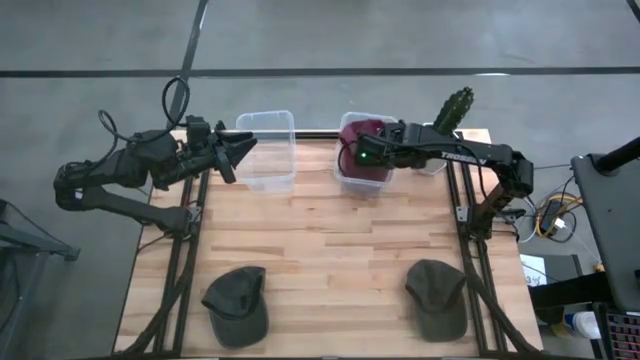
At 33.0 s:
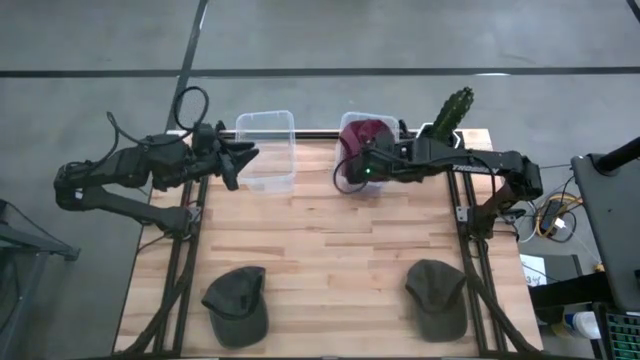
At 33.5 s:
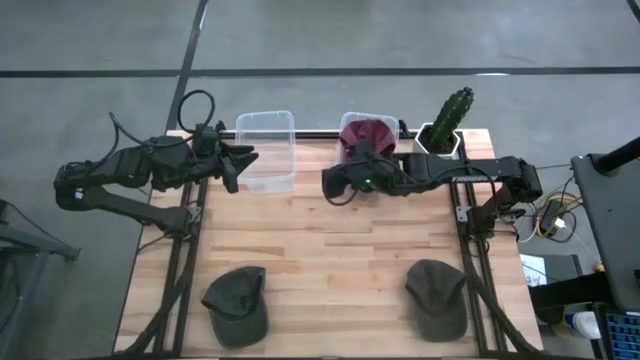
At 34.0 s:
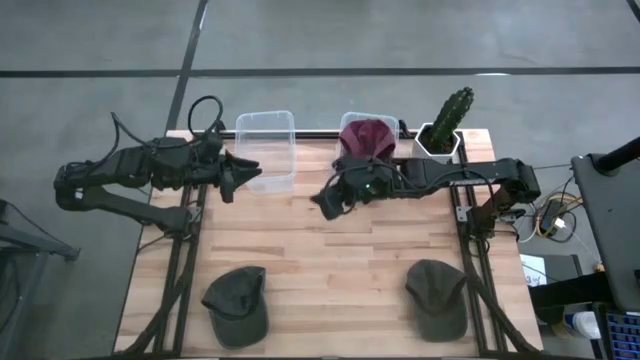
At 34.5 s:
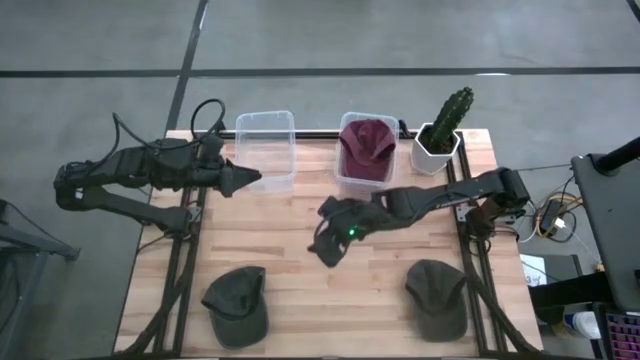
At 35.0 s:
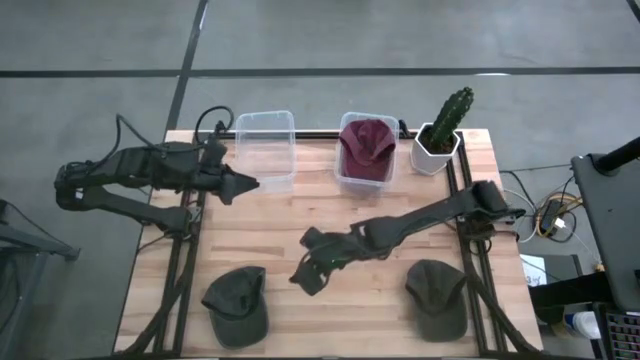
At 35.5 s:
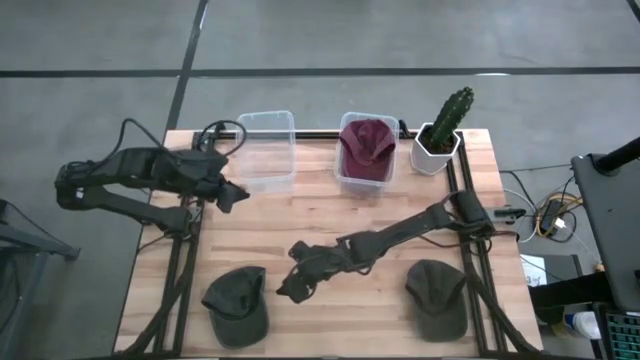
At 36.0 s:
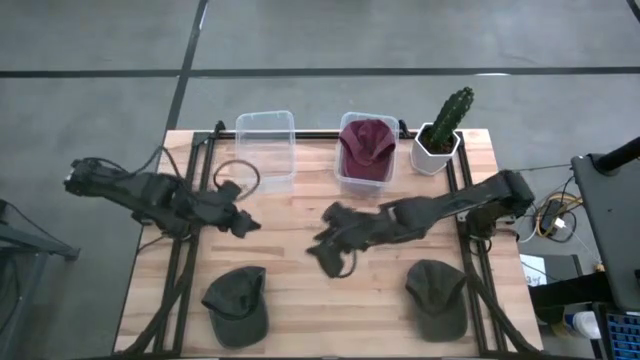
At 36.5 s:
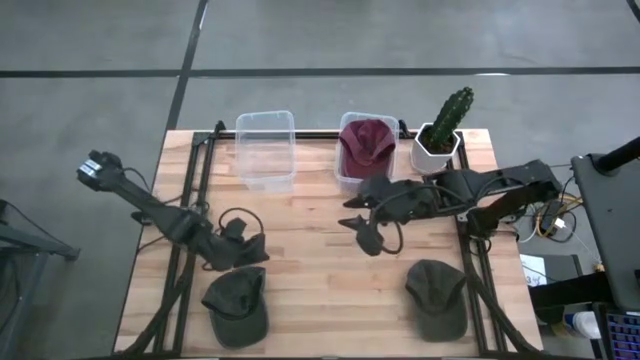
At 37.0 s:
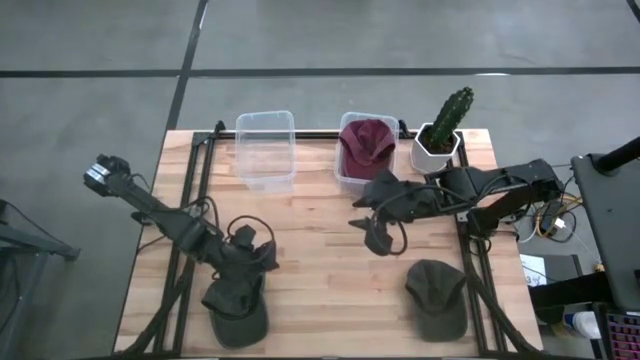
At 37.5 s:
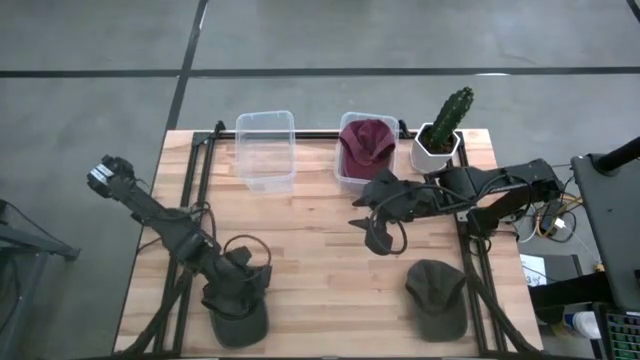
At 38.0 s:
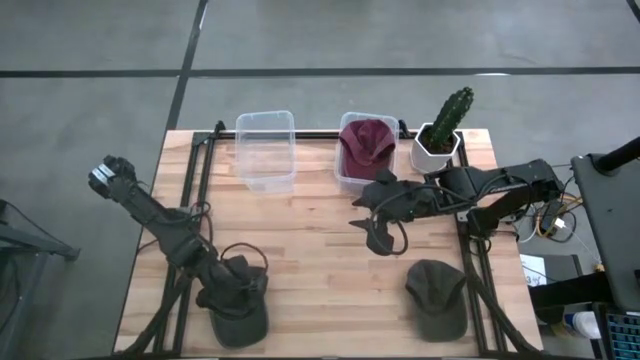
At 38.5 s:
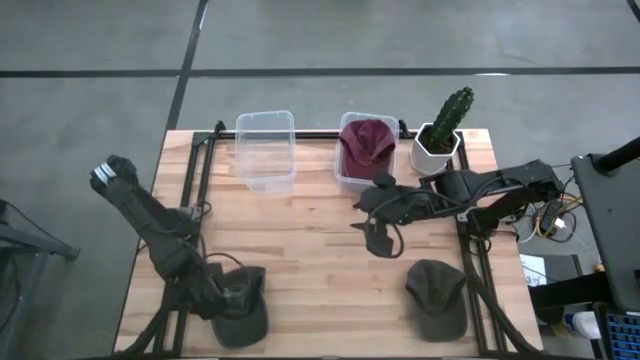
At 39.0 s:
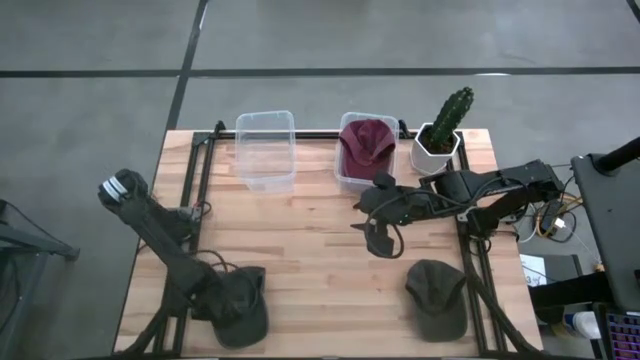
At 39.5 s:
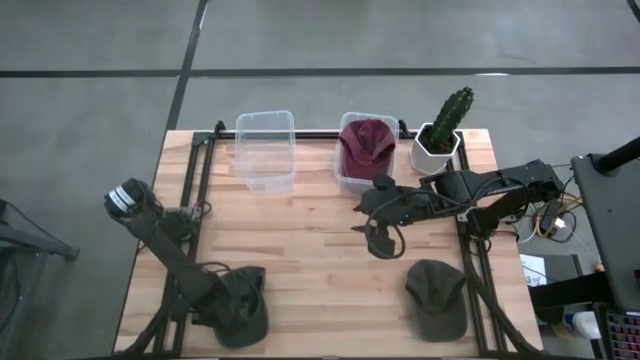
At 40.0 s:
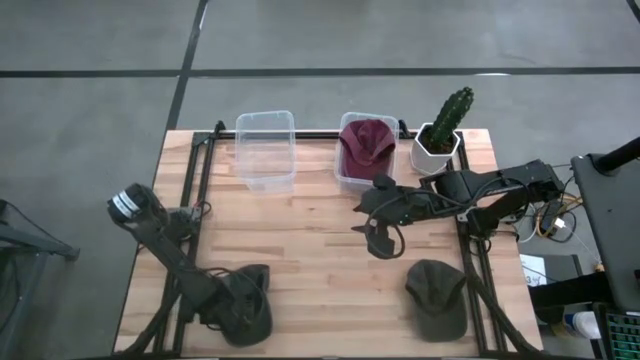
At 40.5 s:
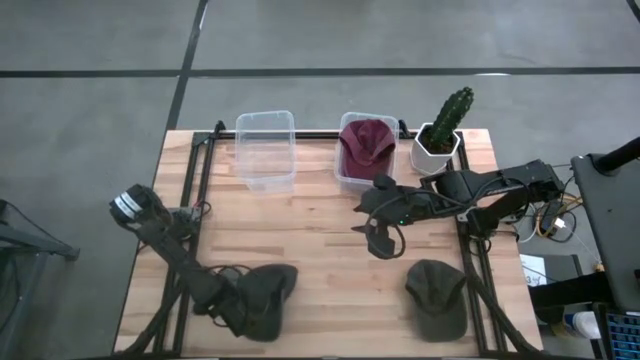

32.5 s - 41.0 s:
Task: Pick & Place hat
Put the left black cap into the left transparent bin

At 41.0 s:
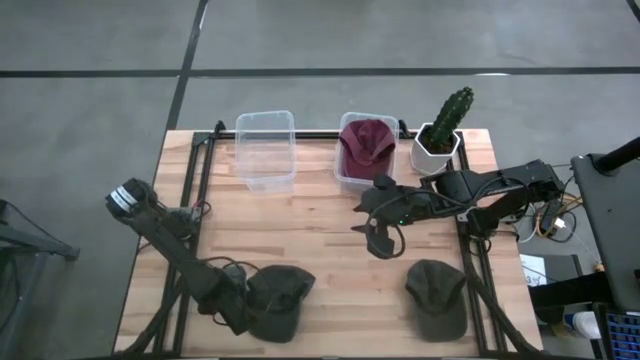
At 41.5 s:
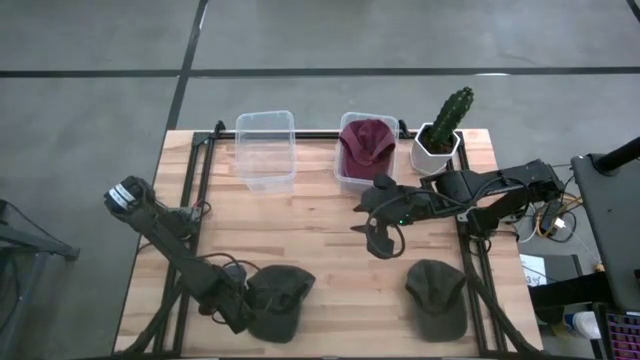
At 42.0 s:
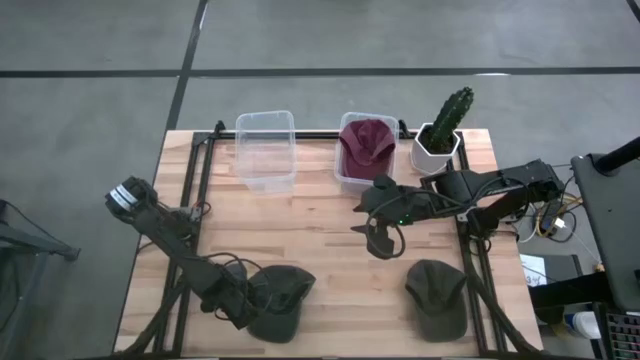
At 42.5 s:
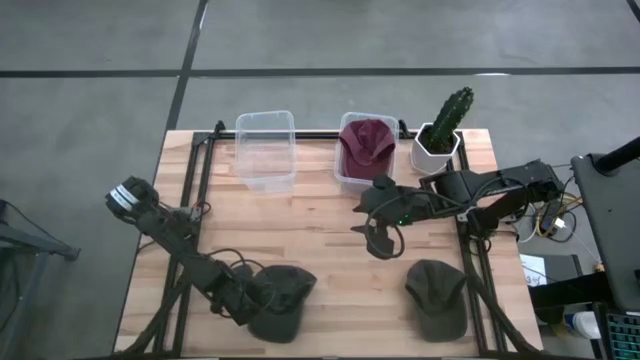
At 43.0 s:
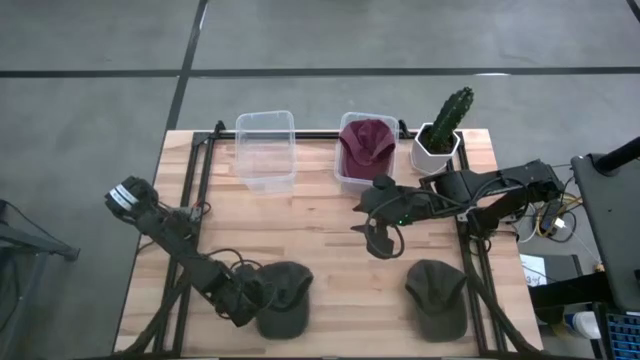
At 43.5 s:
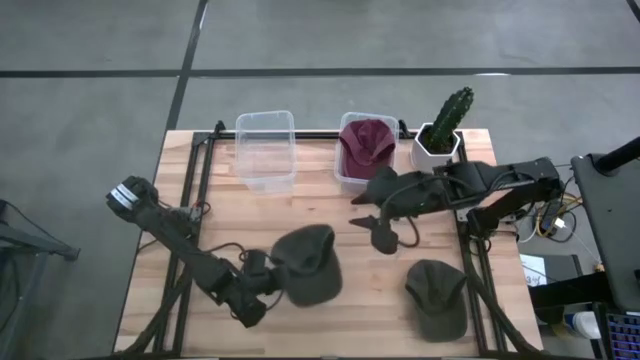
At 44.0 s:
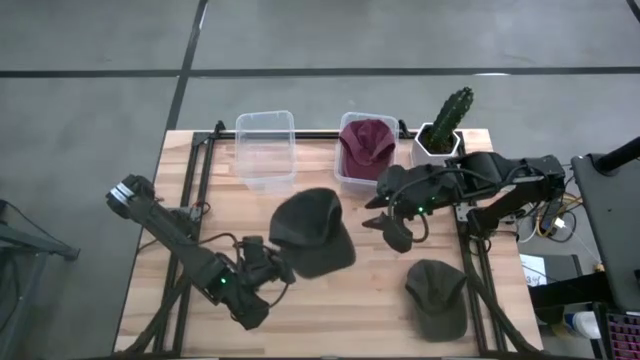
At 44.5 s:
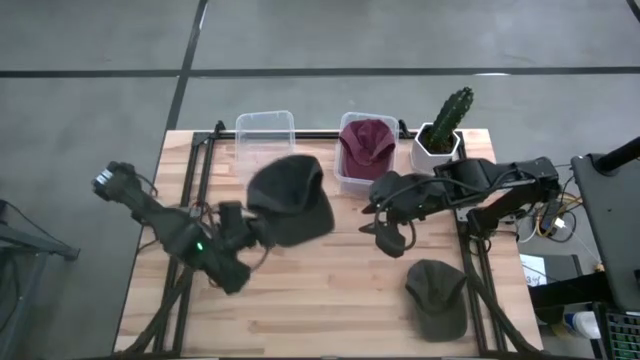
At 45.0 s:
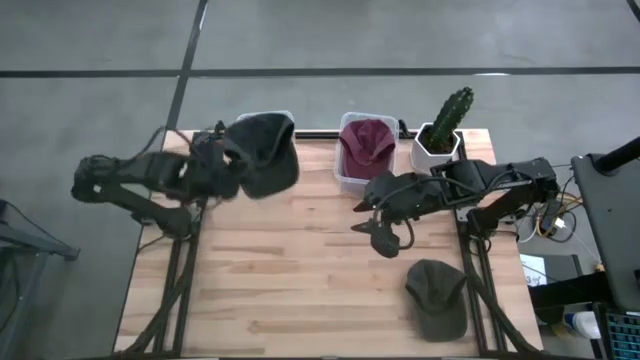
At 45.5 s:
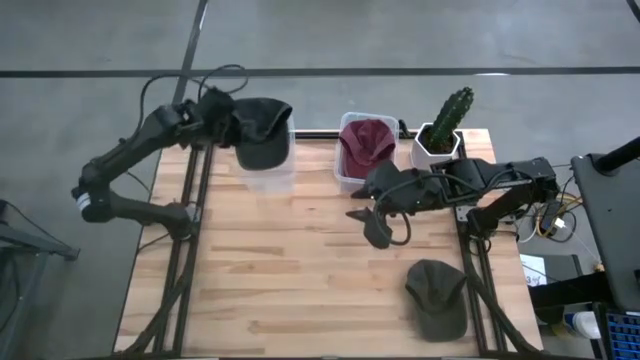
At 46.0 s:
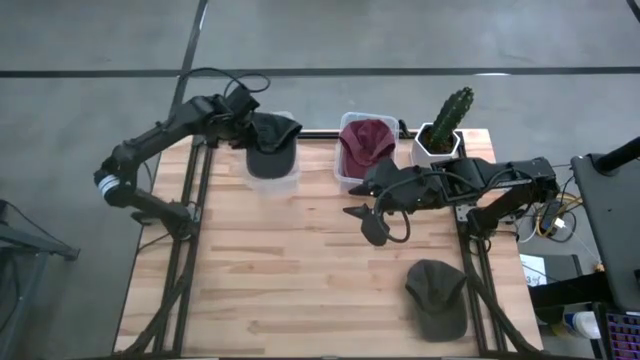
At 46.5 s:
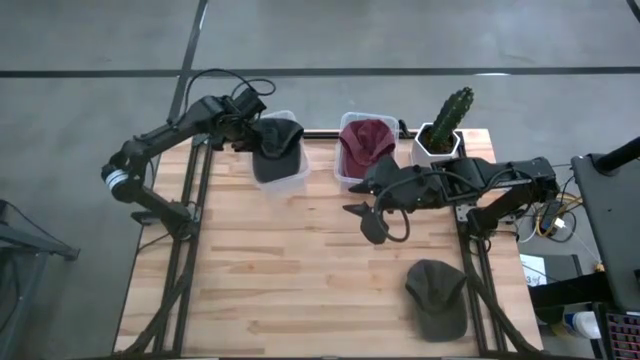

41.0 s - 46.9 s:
Put the left black cap into the left transparent bin

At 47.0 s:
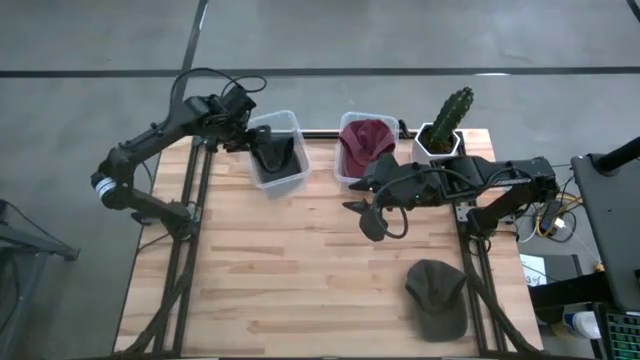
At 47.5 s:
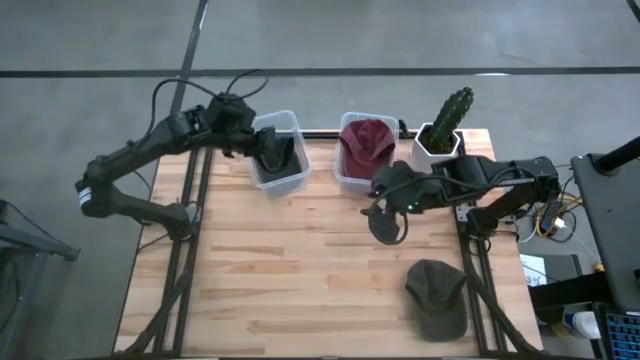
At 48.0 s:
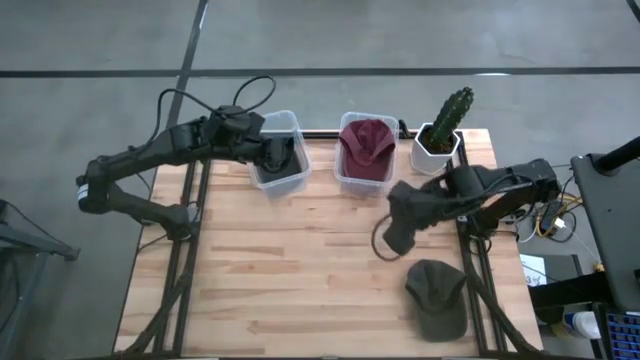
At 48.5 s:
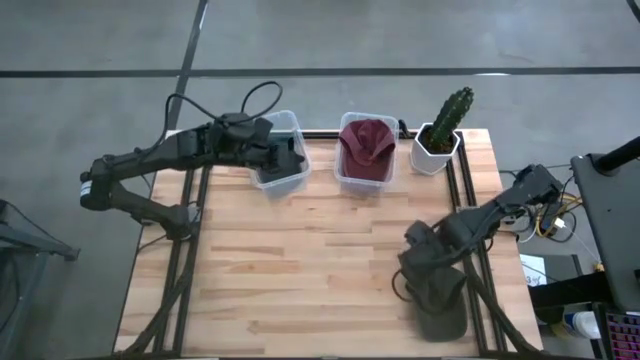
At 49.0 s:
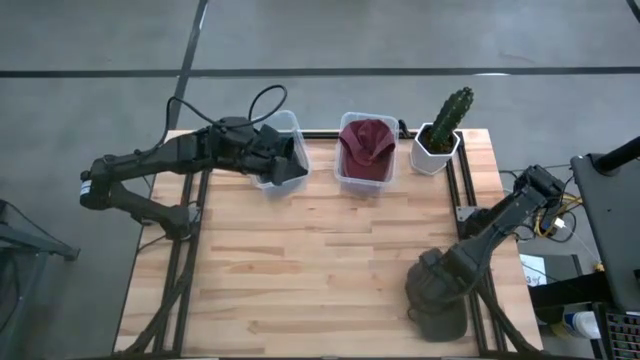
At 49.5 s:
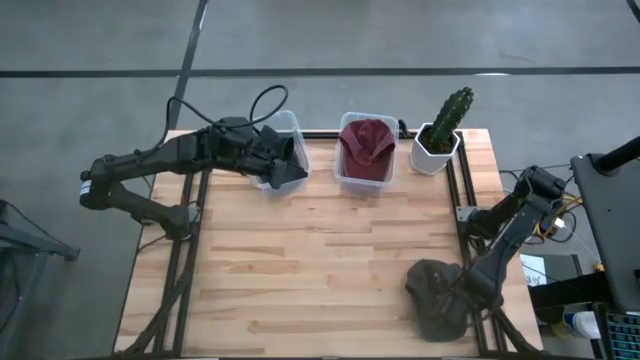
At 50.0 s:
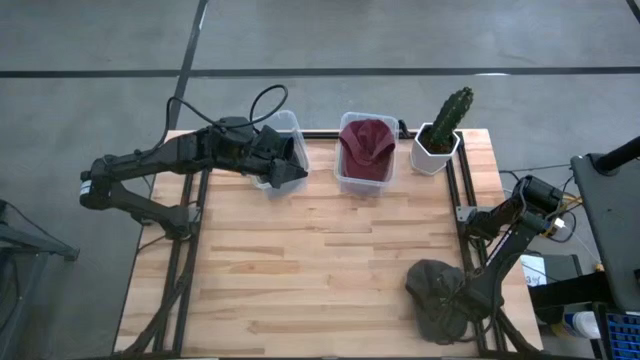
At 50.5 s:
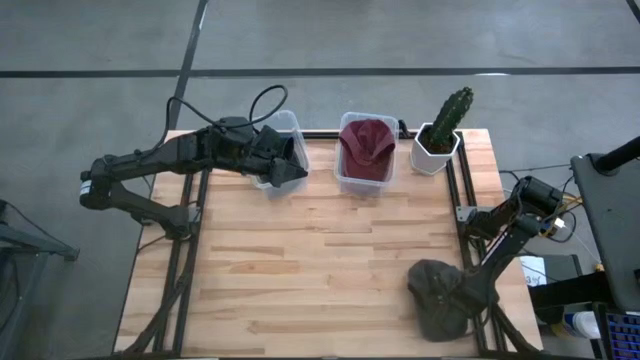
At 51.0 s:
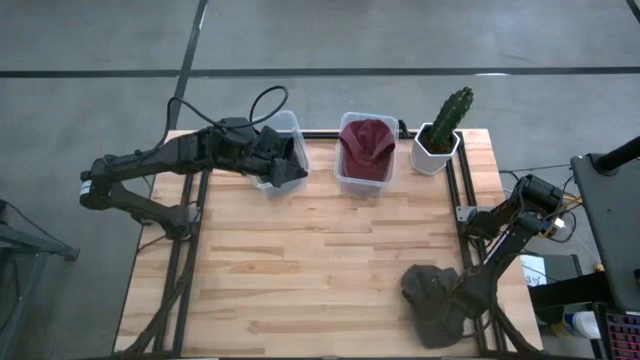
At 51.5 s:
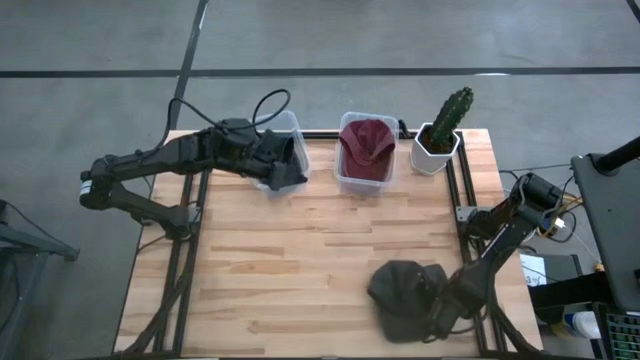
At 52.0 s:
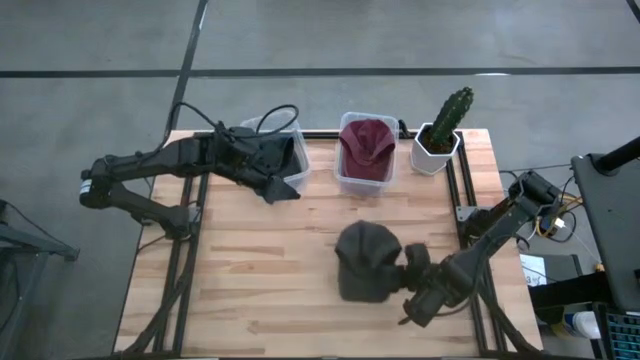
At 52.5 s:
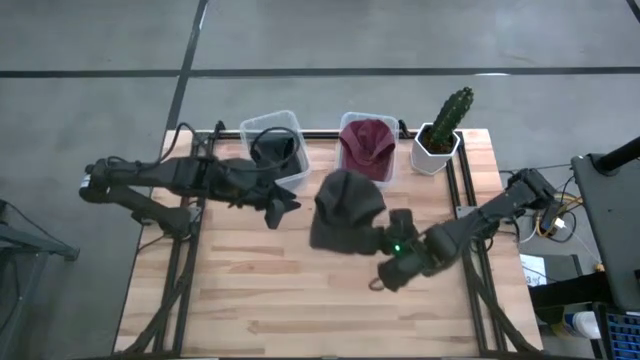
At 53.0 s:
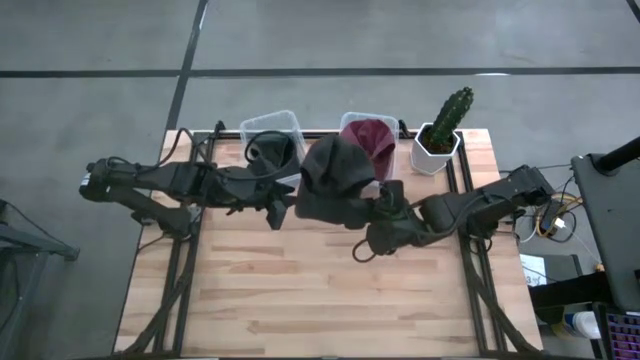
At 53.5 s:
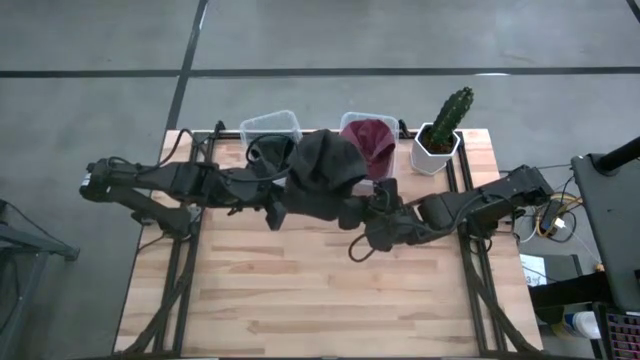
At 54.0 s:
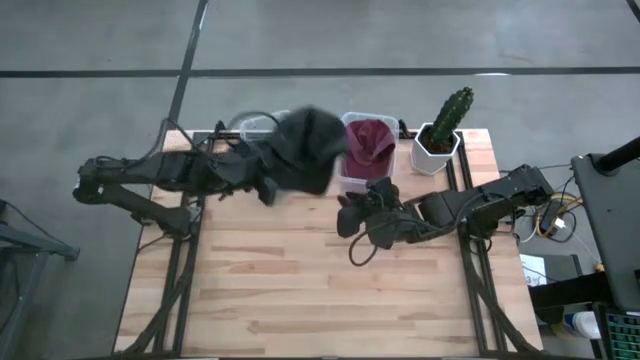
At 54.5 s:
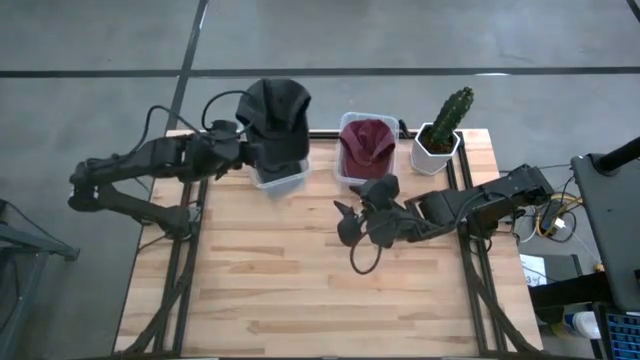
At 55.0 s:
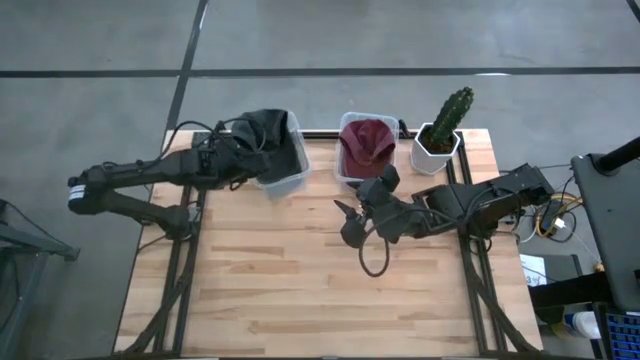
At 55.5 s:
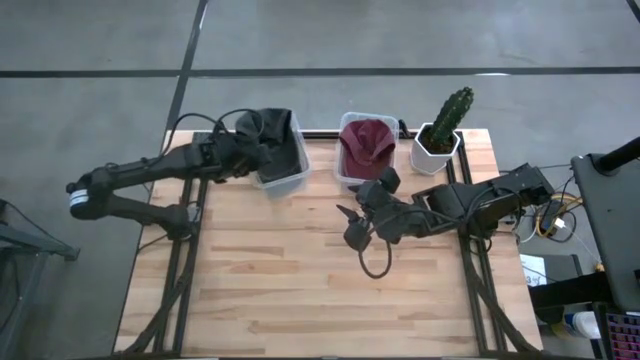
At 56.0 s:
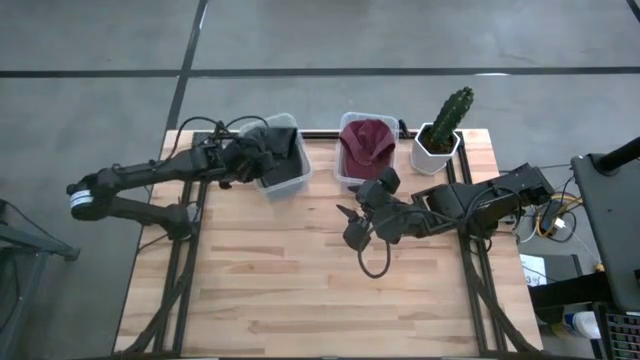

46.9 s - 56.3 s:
Put the black cap into the left transparent bin
